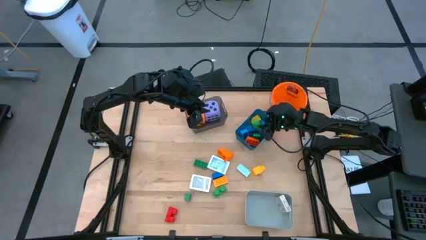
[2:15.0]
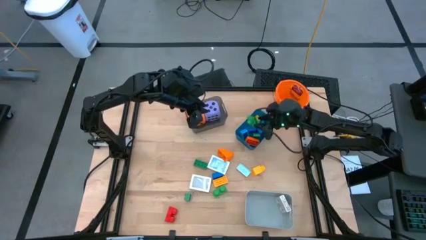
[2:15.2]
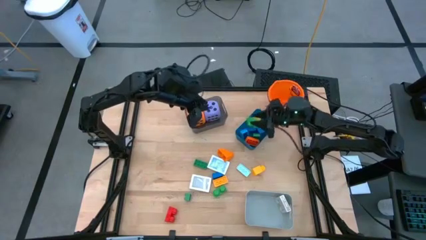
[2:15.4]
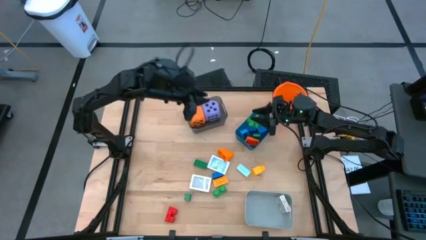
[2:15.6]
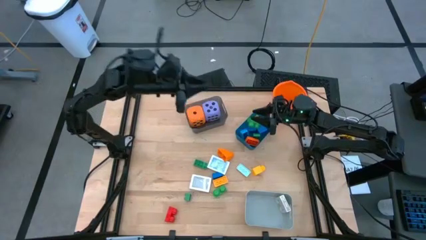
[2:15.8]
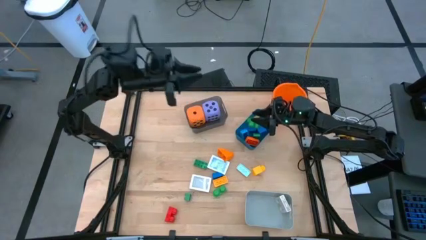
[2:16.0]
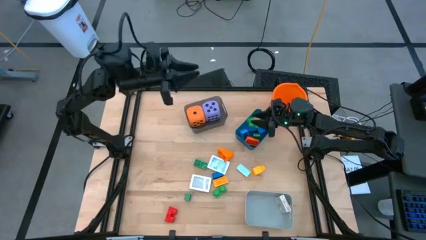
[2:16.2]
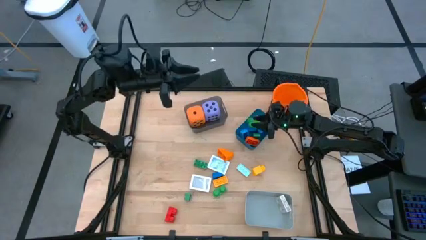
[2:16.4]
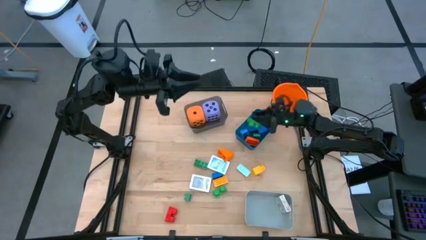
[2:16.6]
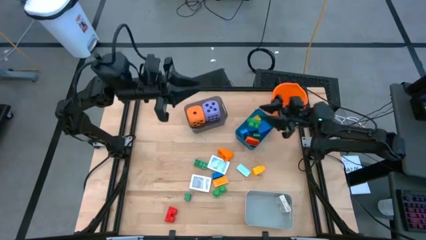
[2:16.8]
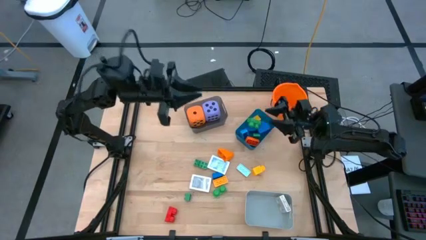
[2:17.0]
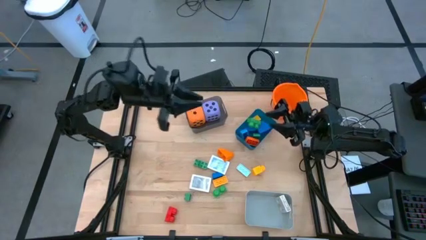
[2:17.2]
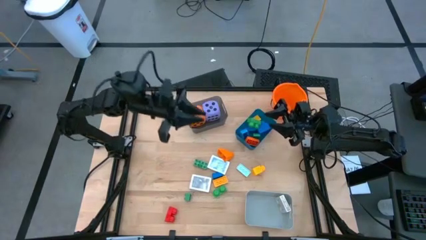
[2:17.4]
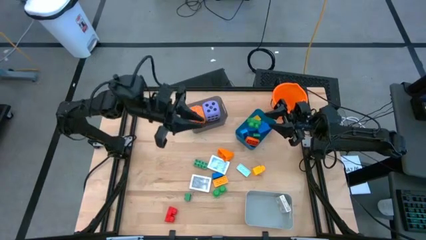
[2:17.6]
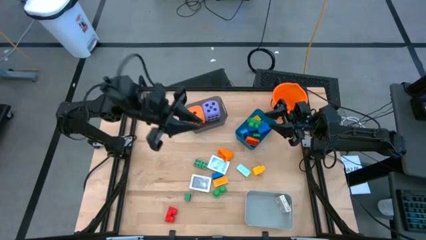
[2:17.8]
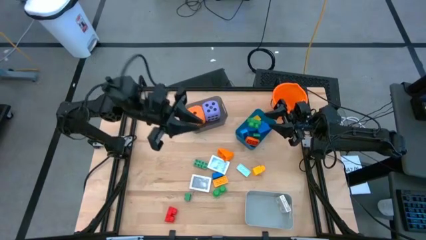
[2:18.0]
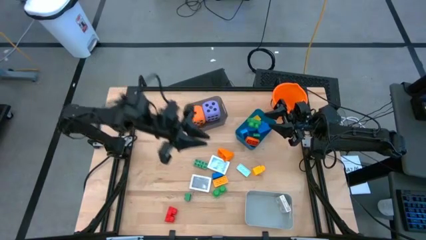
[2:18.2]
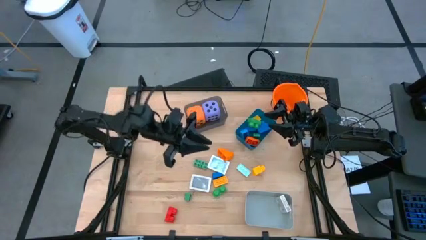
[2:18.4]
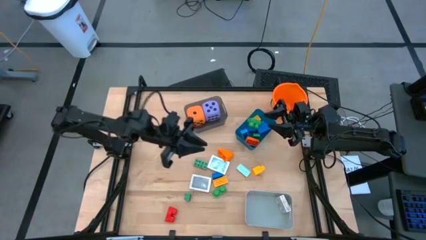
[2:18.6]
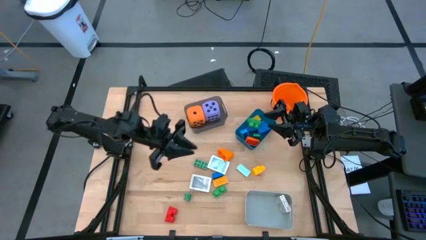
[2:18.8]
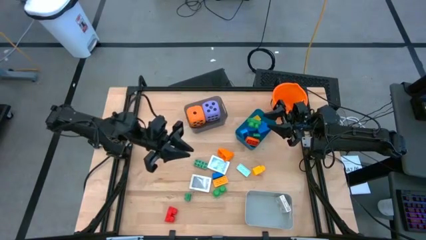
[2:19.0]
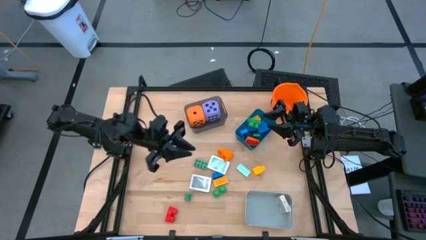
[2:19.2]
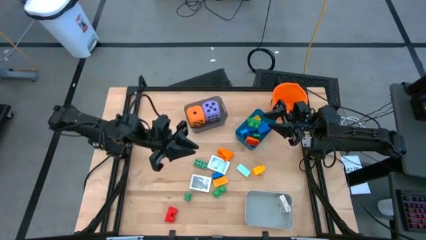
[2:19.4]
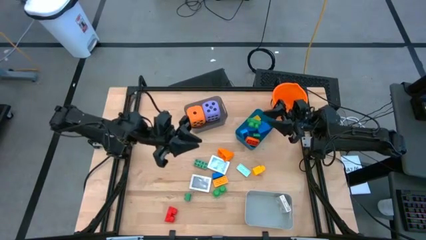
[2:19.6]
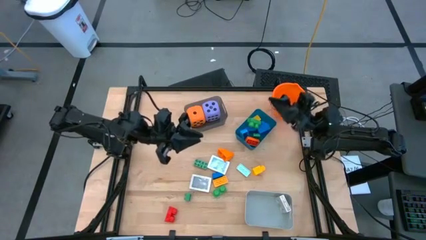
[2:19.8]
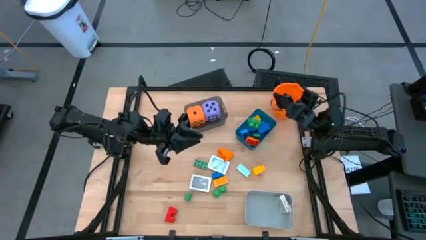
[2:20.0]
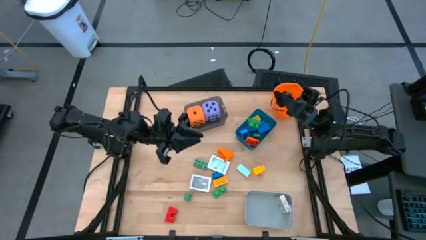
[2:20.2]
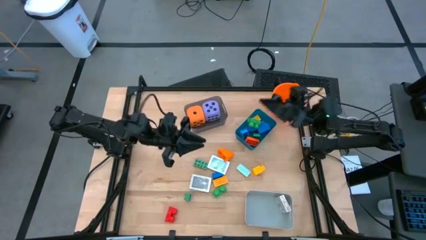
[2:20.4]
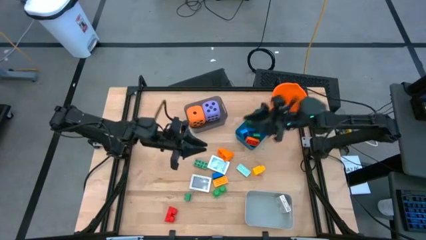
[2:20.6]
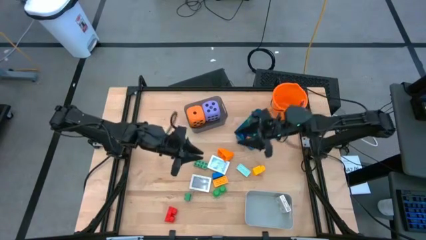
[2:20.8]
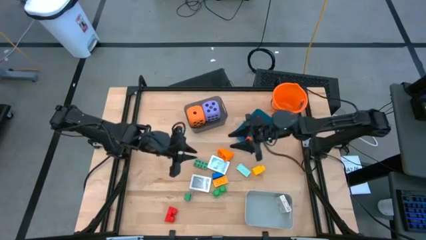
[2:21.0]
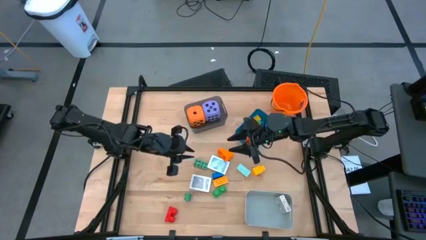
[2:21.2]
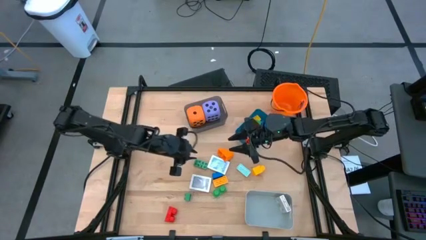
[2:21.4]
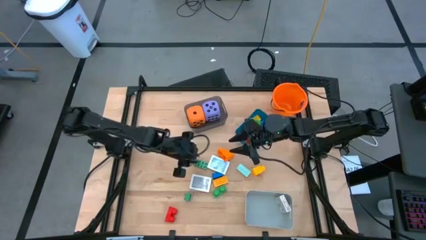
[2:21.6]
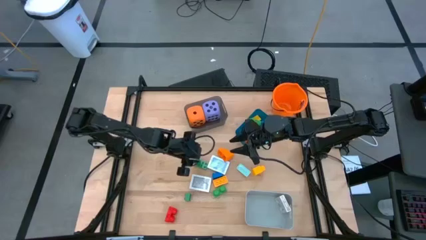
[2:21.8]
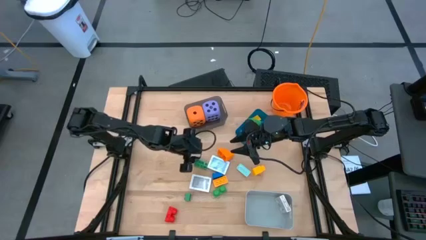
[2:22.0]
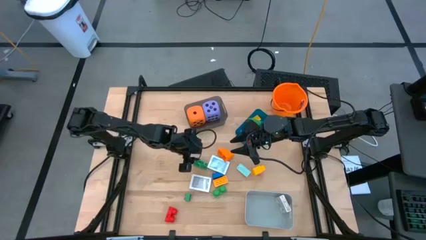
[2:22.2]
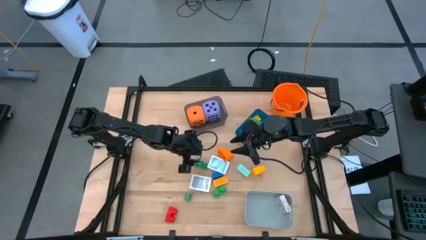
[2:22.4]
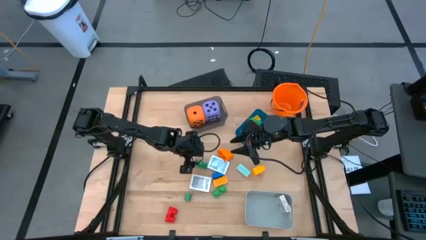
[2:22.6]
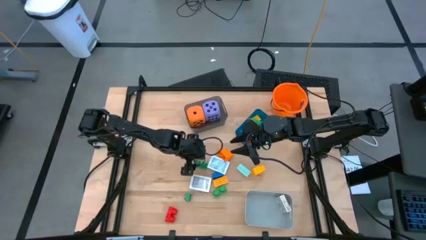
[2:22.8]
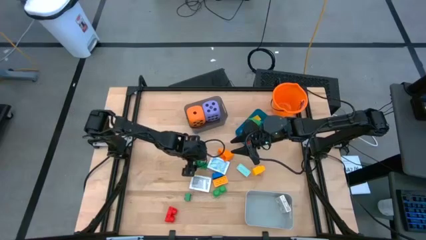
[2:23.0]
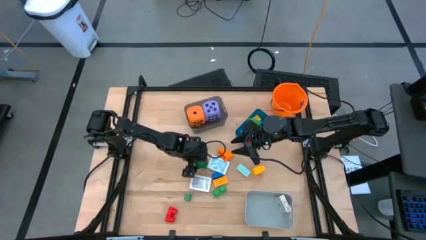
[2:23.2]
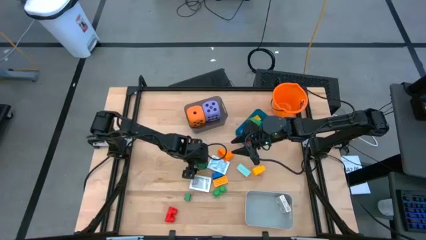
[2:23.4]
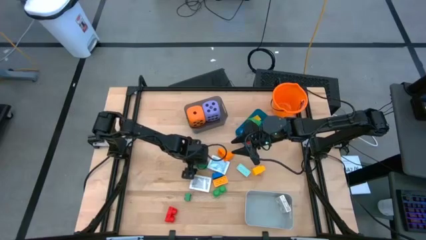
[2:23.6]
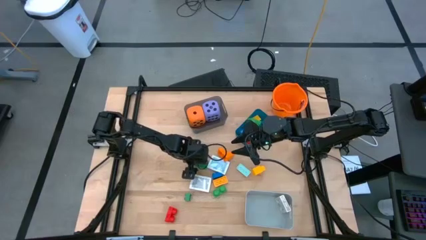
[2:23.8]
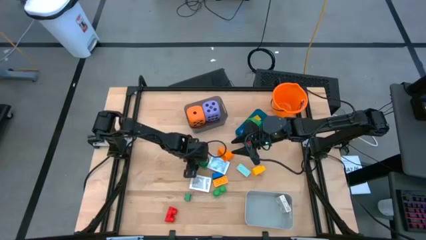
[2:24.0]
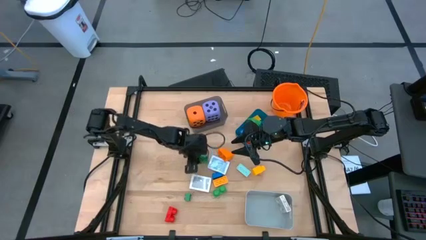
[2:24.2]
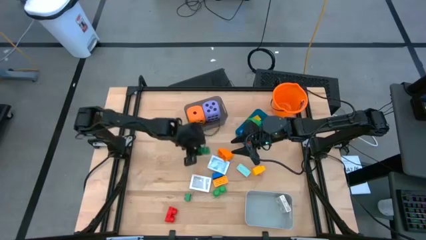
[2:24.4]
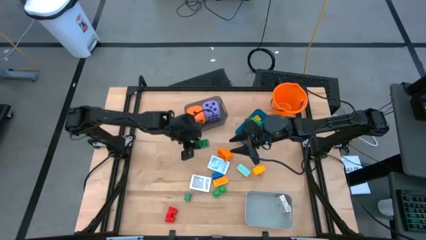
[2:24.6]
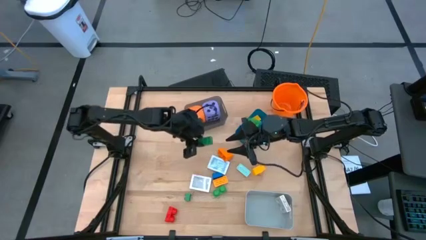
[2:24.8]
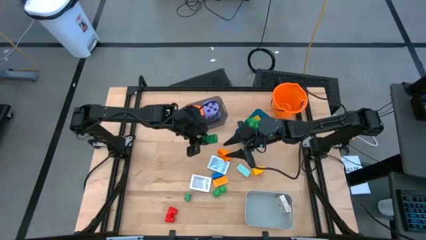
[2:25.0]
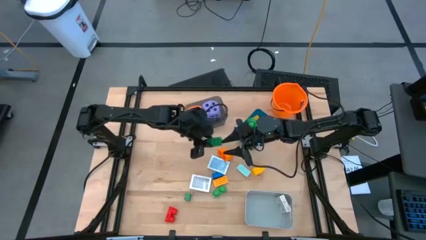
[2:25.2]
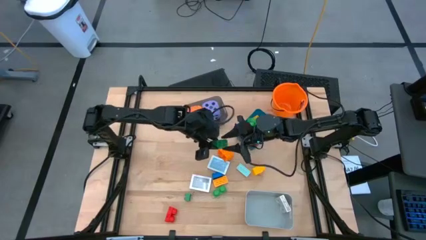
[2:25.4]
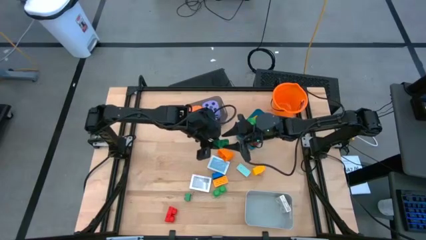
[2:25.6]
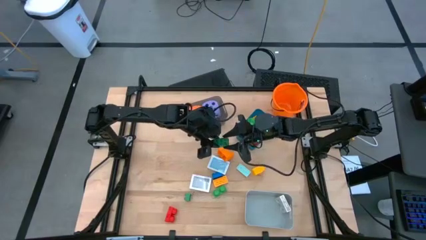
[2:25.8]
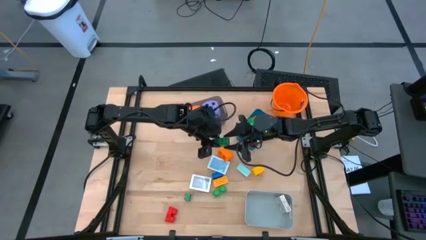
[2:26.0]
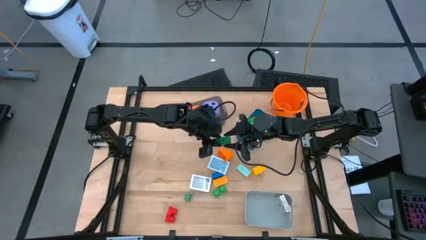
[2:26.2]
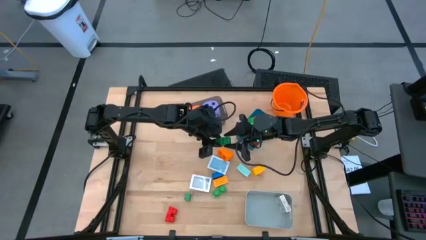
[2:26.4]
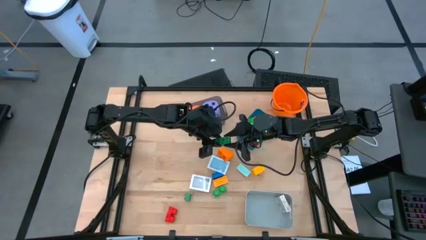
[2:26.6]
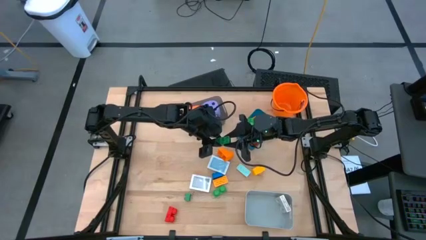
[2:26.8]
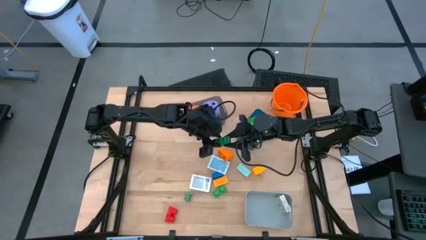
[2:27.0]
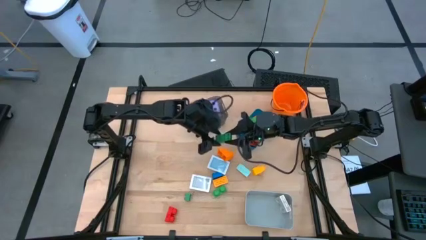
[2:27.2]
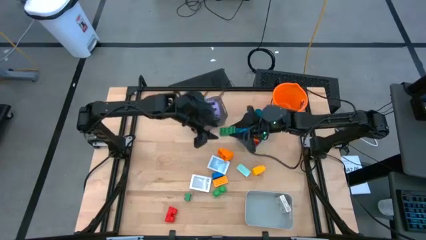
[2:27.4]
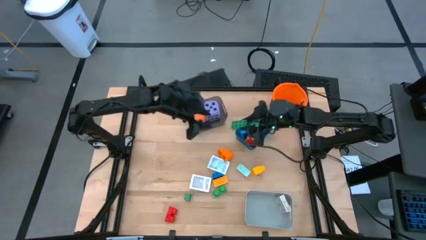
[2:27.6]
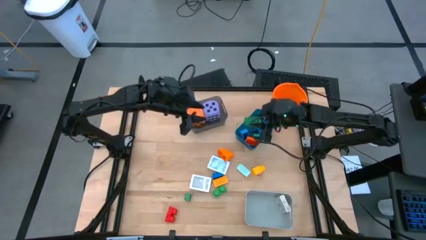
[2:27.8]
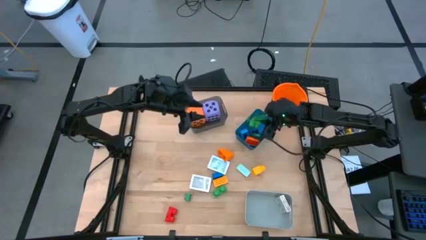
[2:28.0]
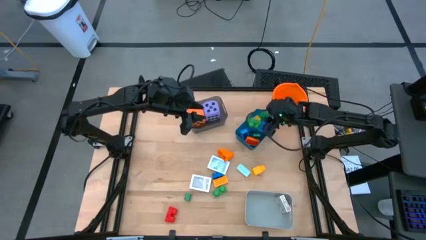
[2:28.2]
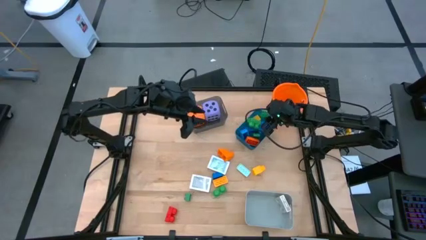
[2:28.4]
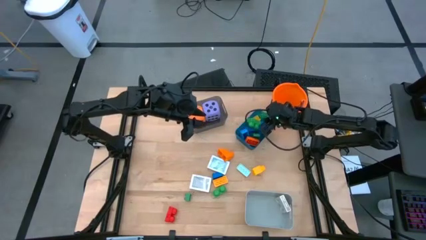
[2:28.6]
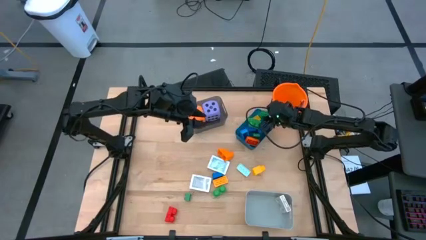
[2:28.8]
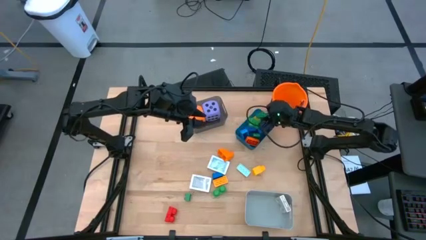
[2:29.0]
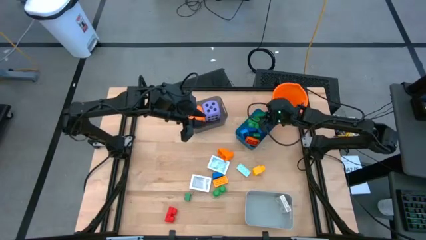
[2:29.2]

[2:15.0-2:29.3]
Task: Pick & Place Toys
Put the top green game piece into the blue bin

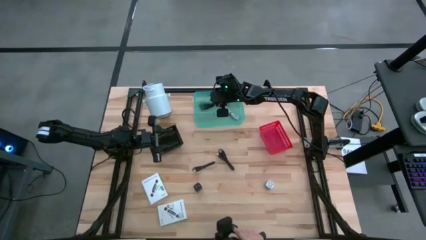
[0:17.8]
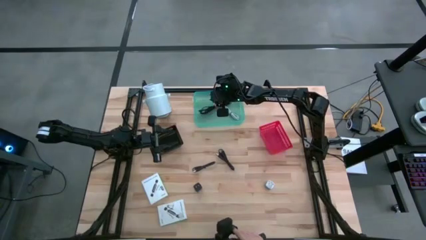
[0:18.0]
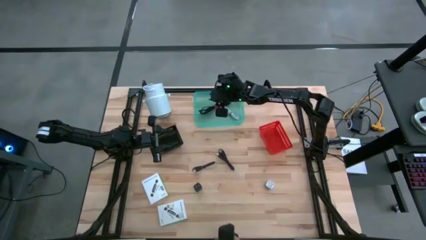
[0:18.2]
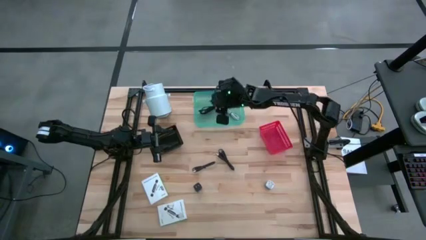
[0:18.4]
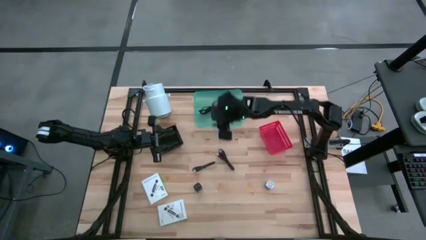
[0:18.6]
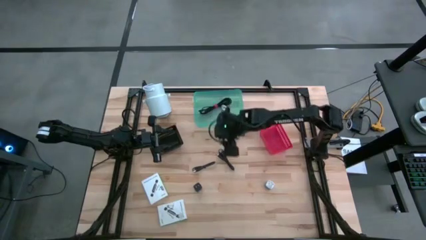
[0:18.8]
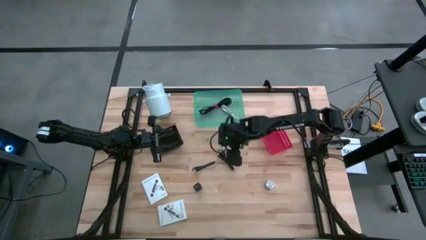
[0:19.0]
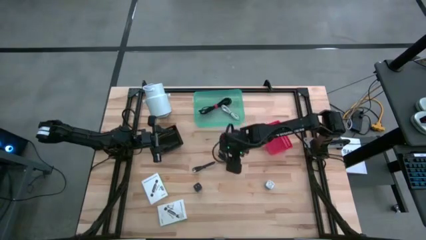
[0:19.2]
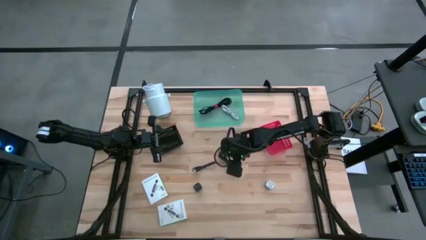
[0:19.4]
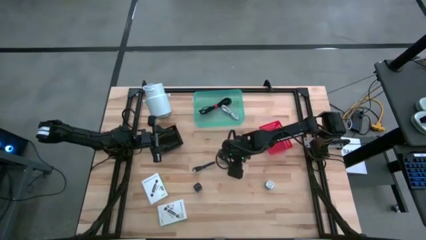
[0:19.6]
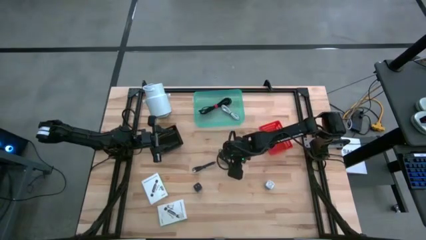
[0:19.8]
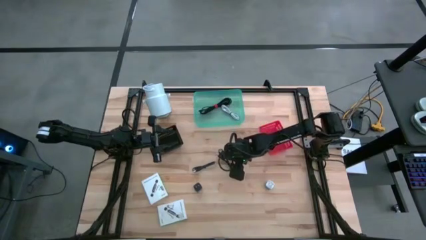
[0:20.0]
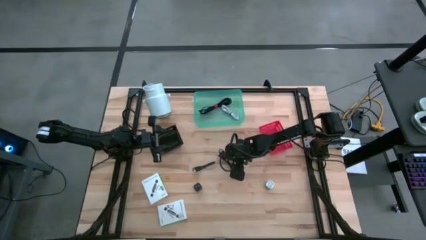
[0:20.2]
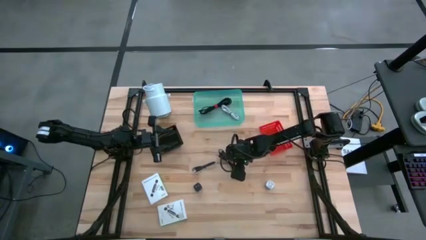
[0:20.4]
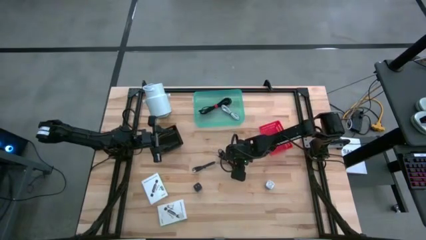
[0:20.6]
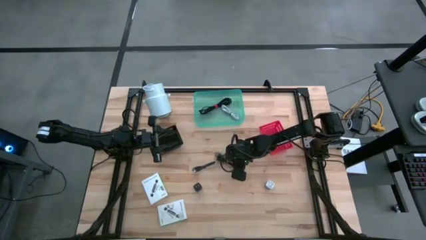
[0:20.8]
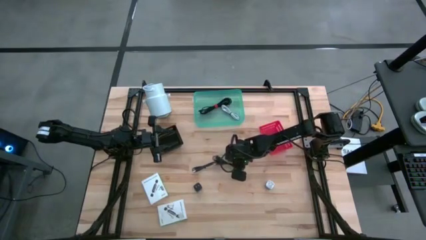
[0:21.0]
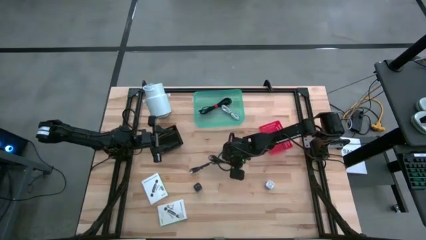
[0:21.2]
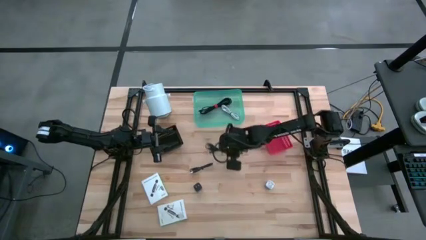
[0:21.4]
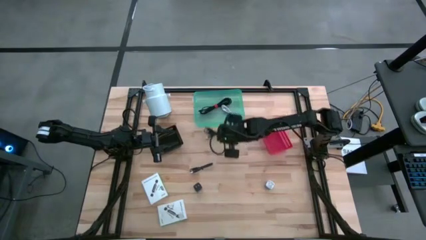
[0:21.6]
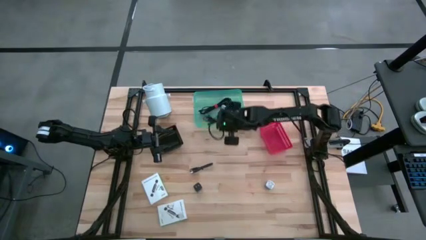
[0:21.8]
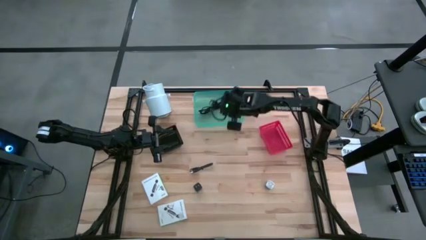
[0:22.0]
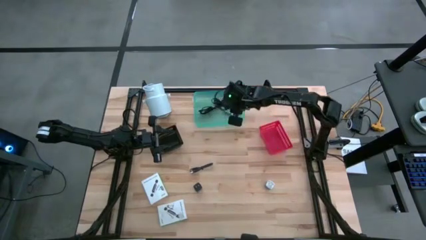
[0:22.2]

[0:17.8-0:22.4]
Task: Pick and place items into bin
Put the right black charger cable into the blue bin
